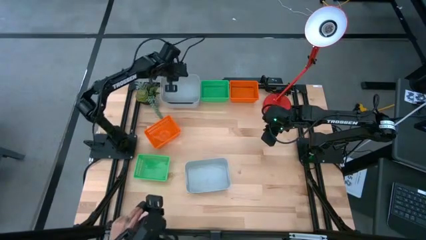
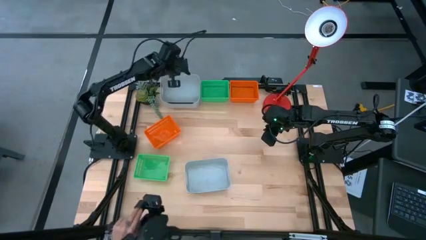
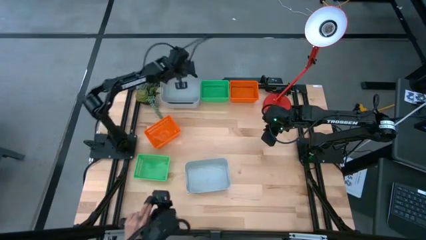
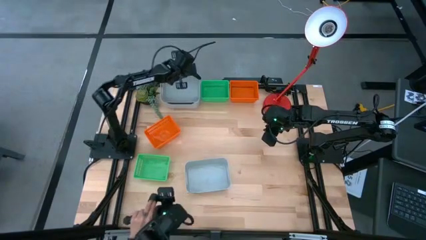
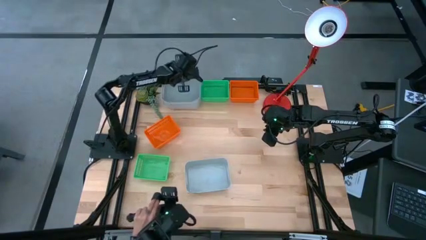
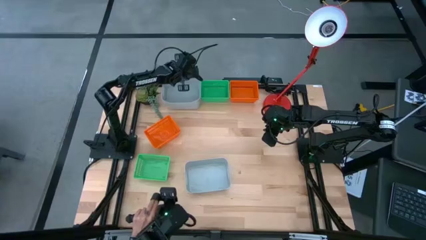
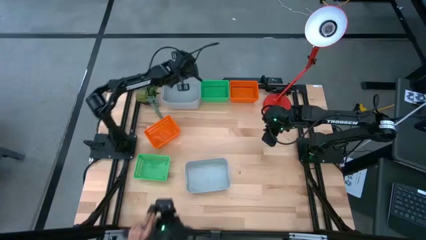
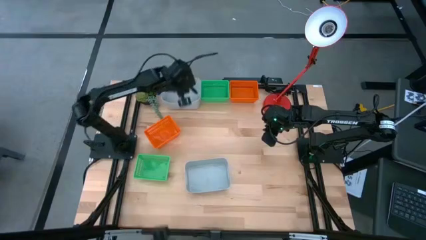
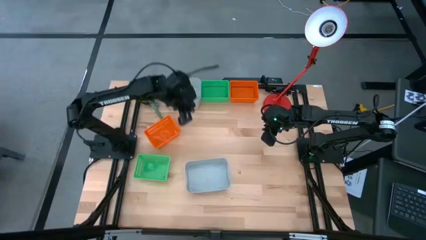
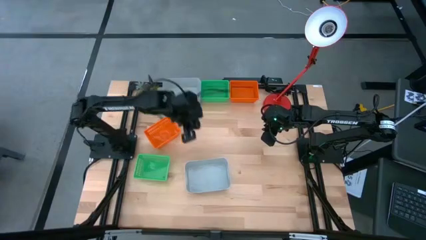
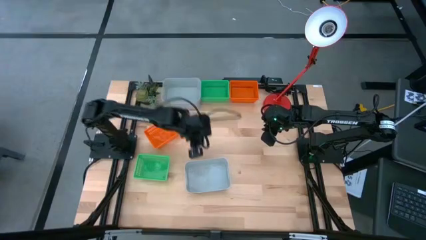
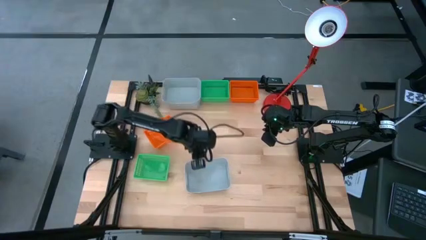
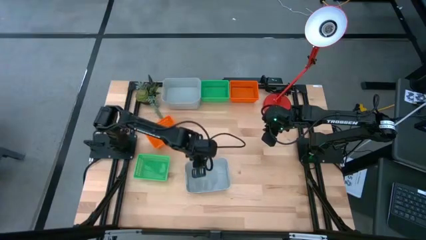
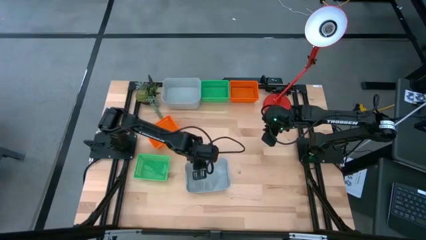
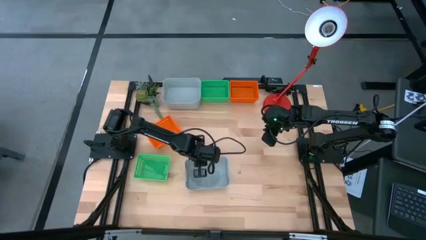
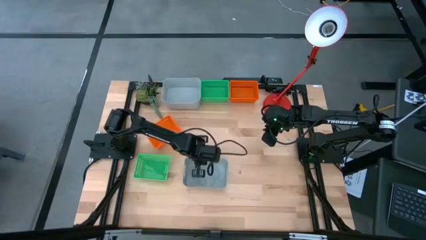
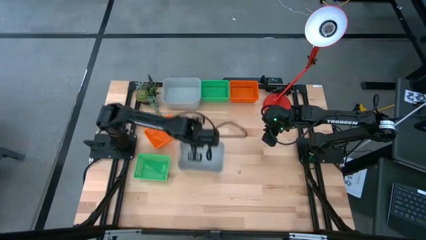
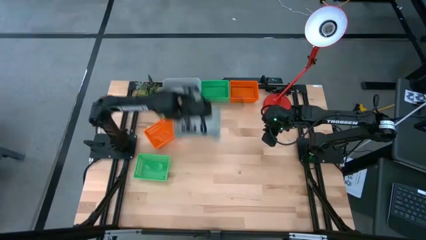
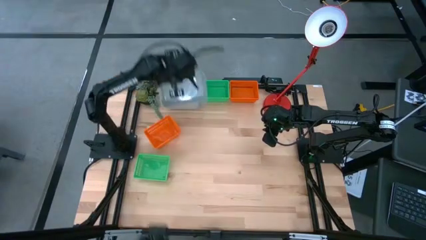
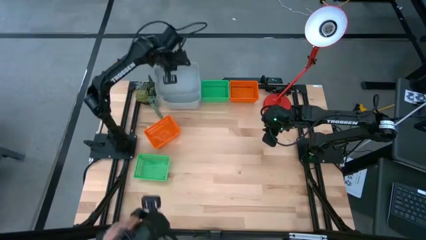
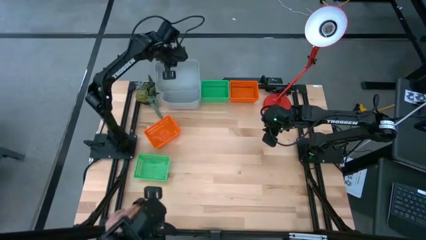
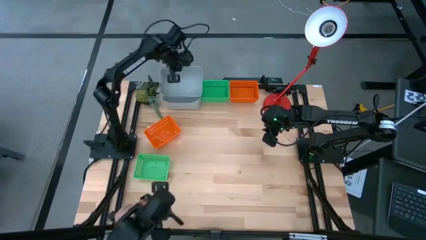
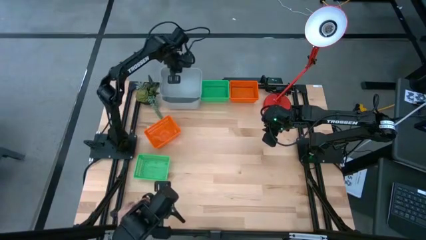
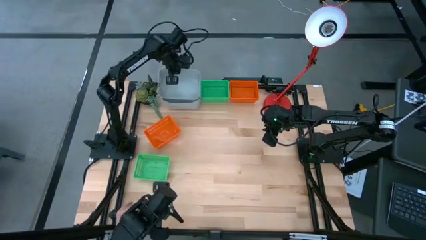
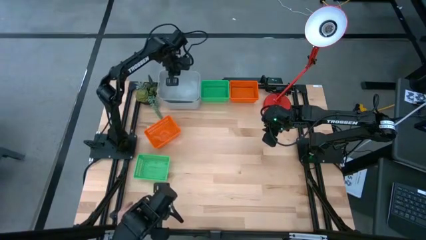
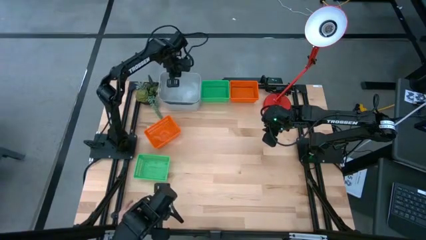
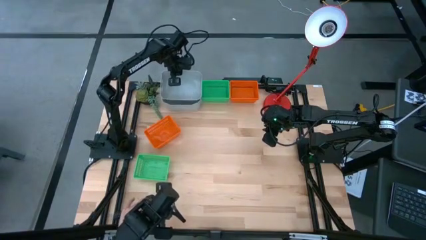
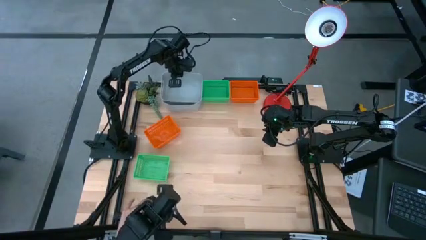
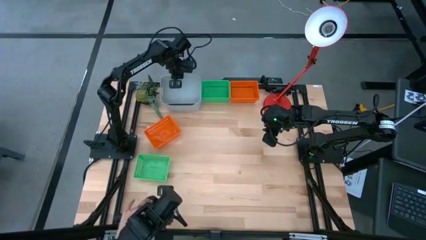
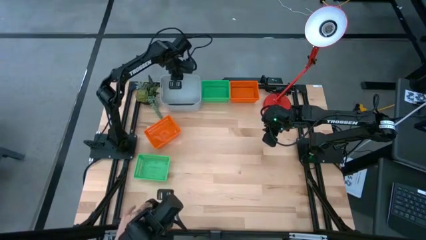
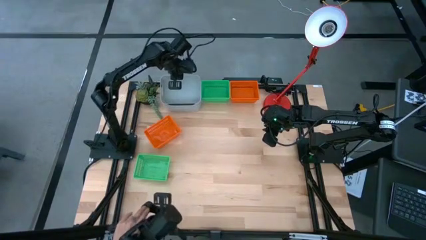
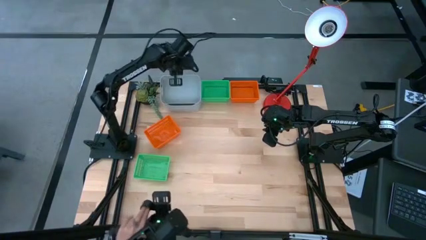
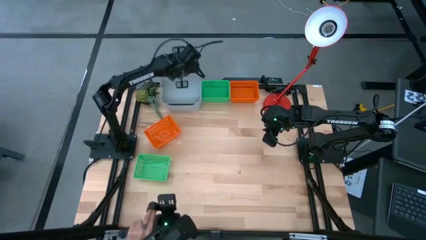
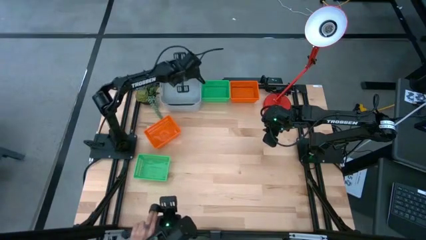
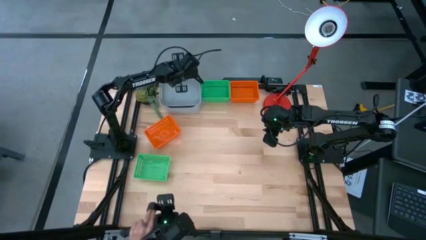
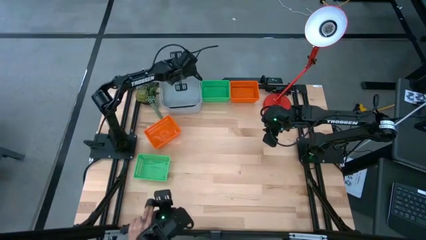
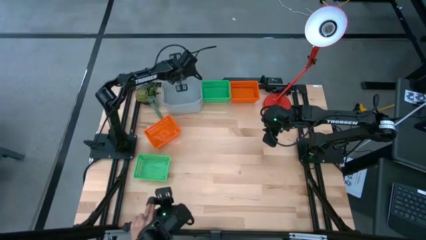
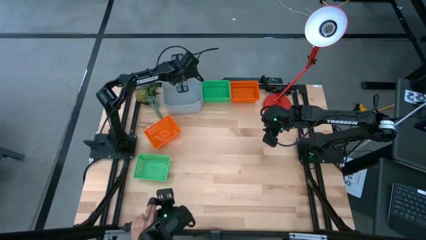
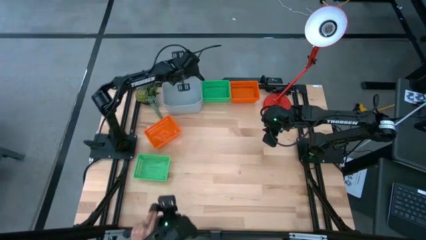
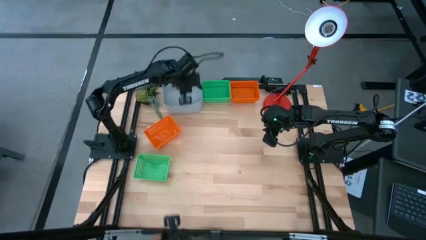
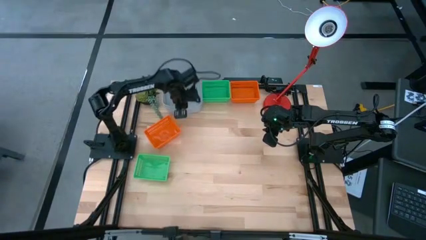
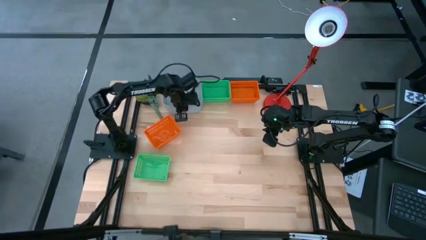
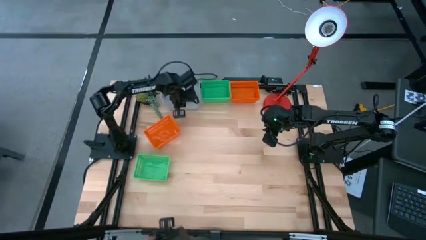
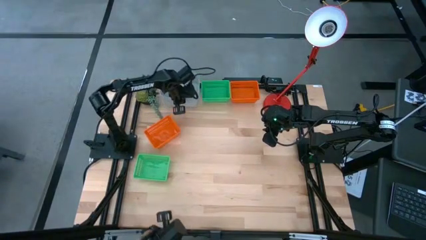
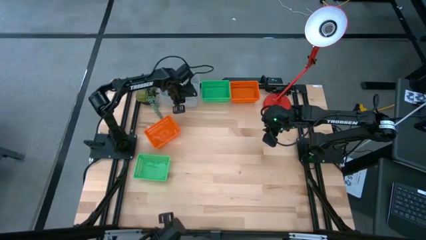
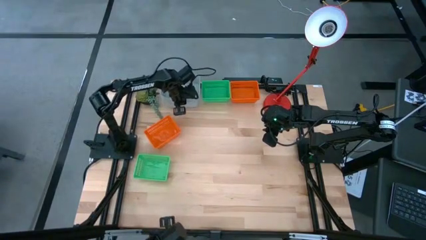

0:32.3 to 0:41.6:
Stack the gray bin on top of the top gray bin

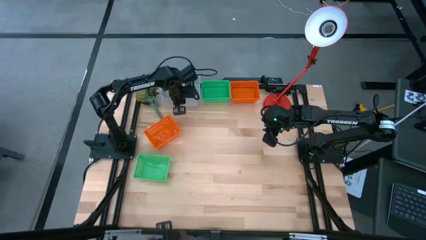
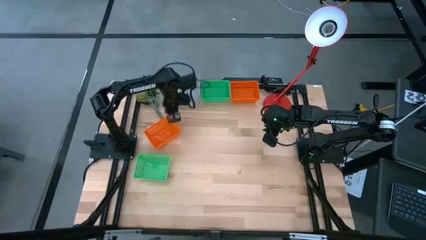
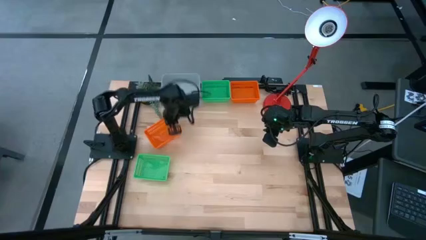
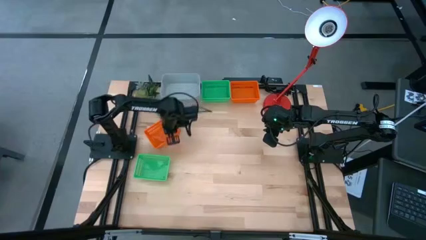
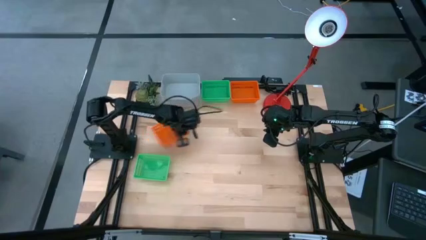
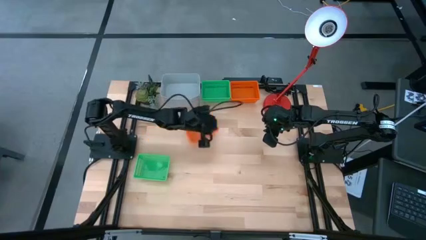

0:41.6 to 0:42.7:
Move the bottom orange bin to the center of the table

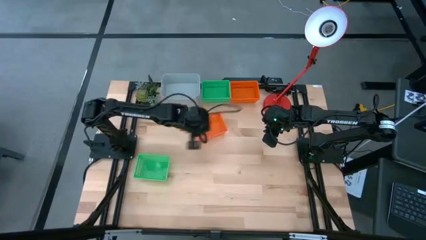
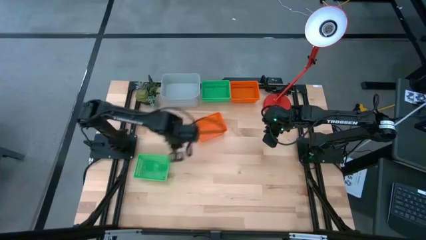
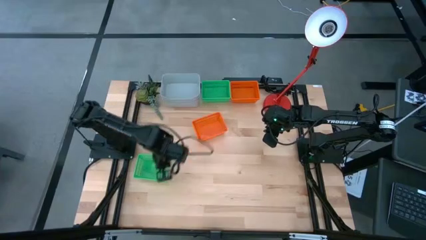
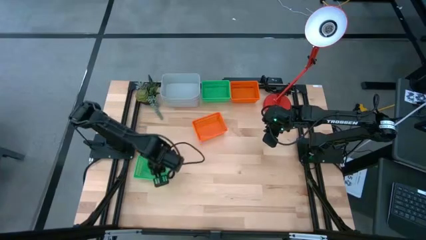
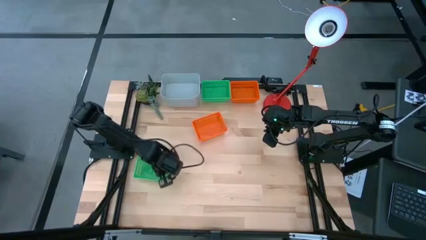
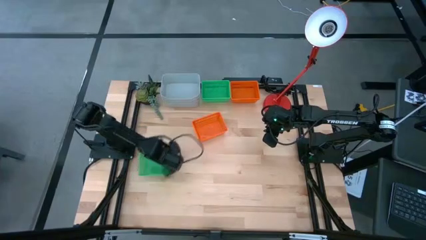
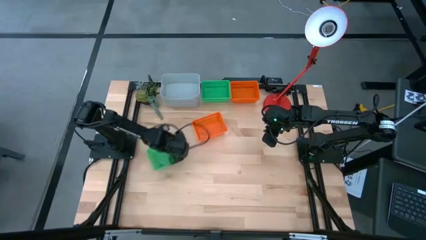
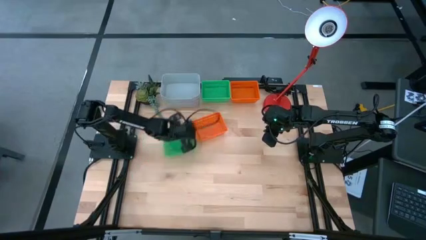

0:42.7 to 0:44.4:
Move the bottom green bin to the center of the table

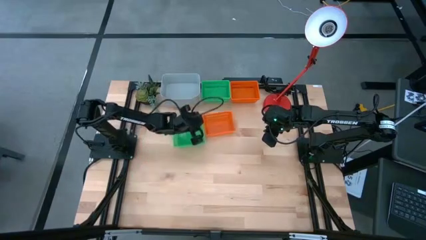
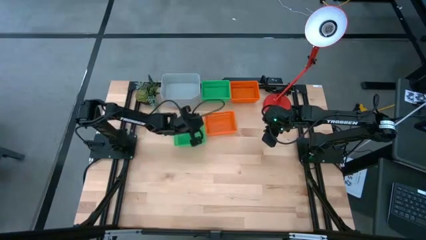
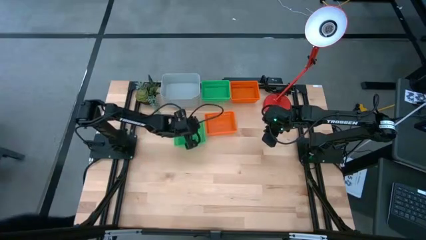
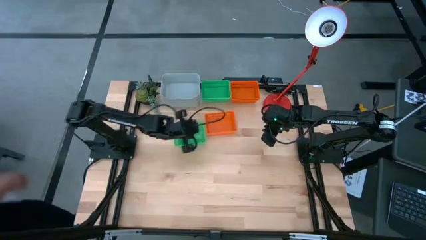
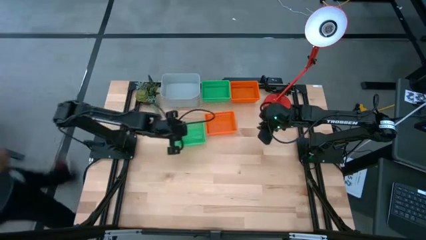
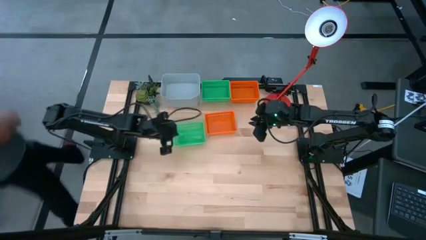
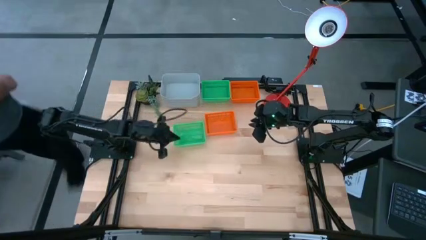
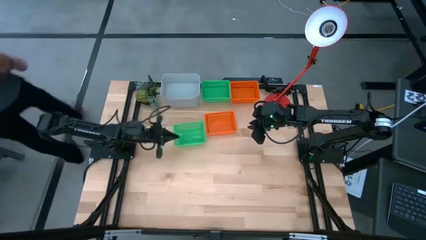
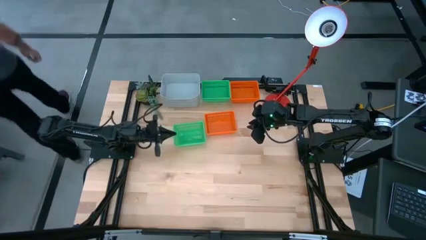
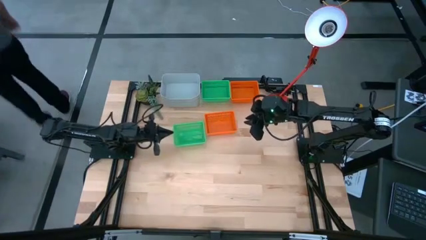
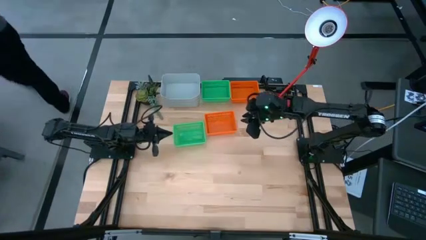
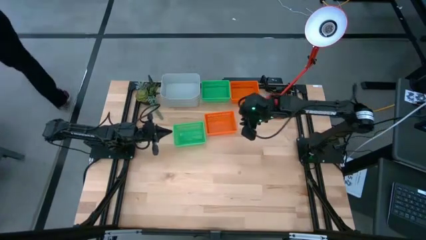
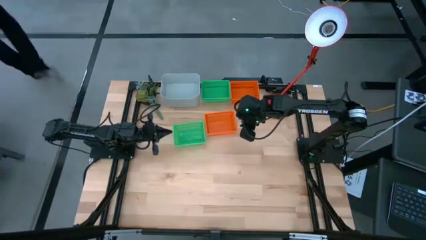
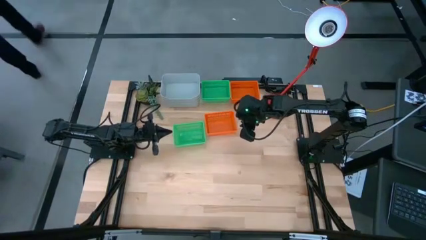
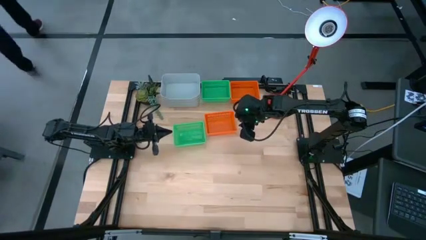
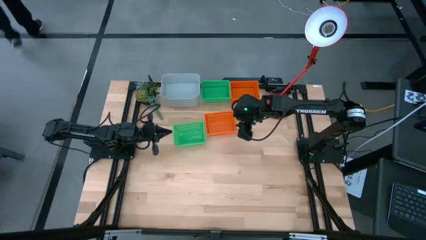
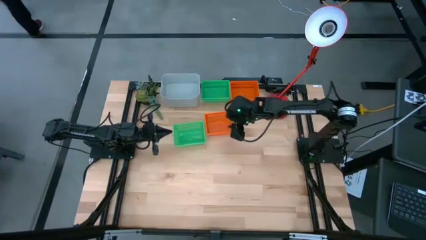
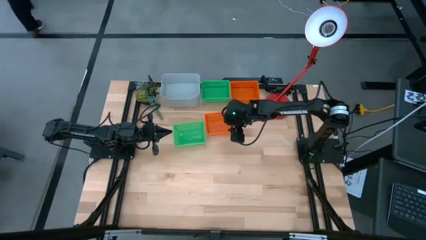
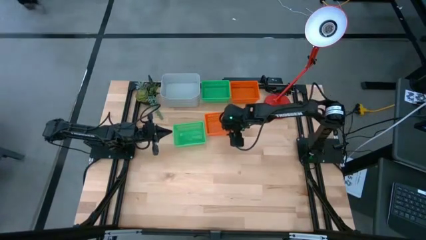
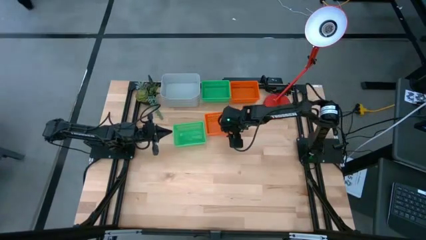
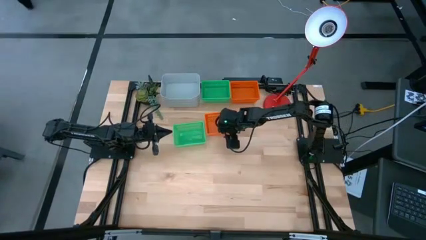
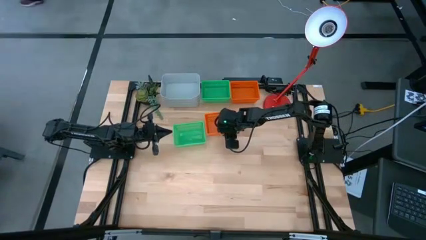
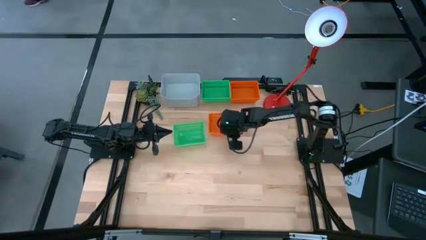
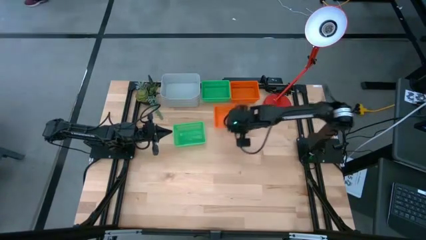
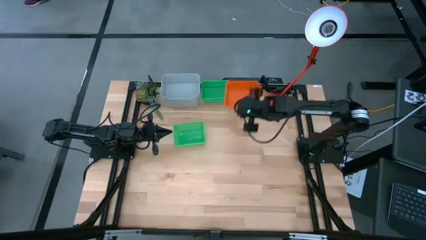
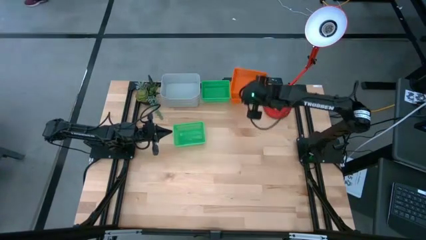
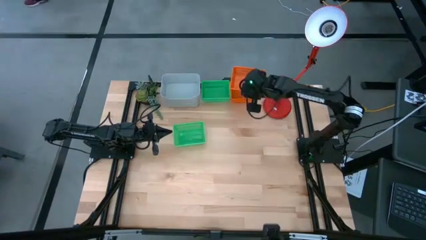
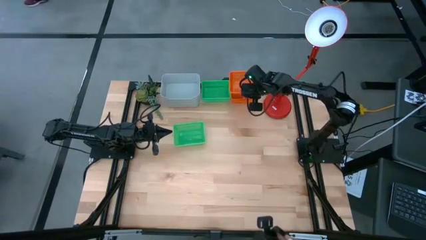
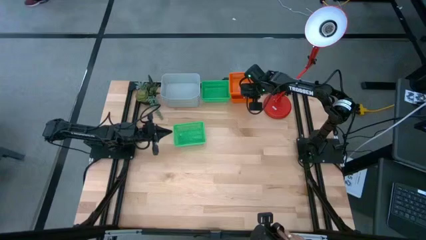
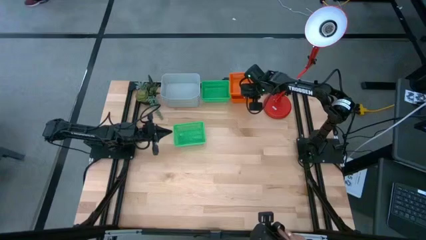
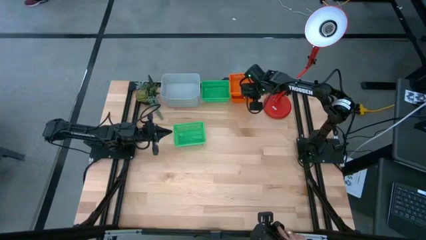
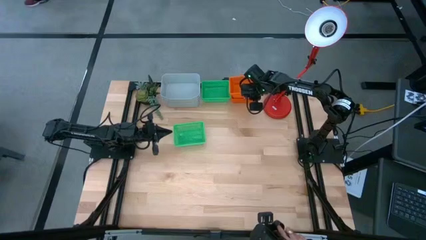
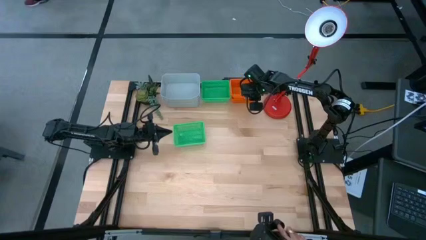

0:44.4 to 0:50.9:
Stack the bottom orange bin on top of the top orange bin
